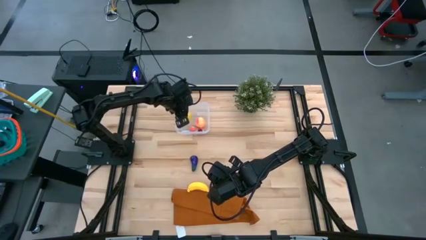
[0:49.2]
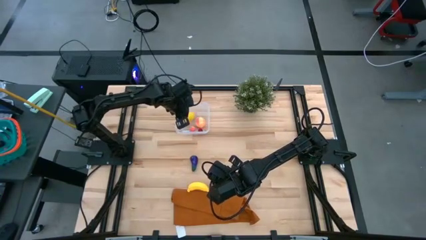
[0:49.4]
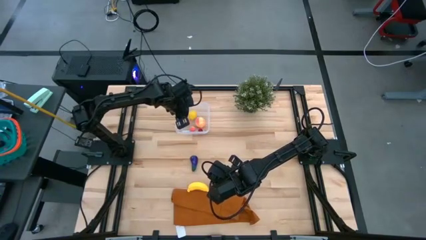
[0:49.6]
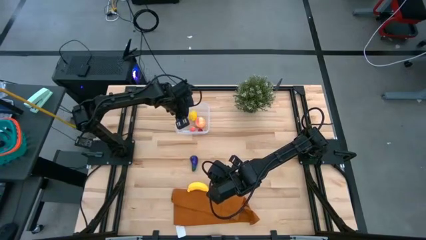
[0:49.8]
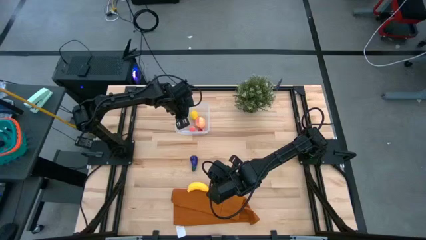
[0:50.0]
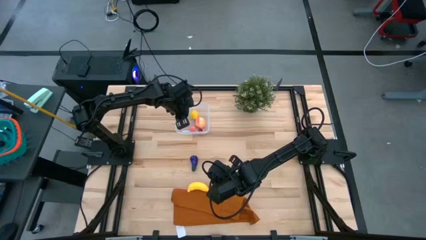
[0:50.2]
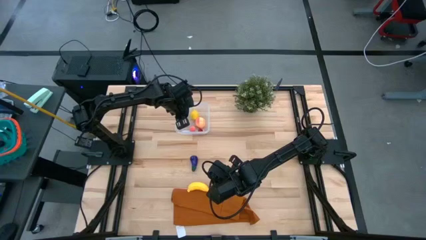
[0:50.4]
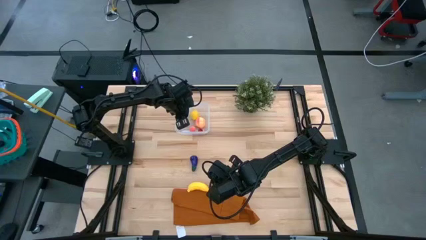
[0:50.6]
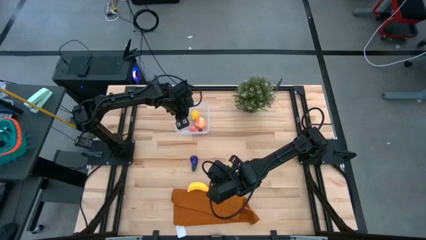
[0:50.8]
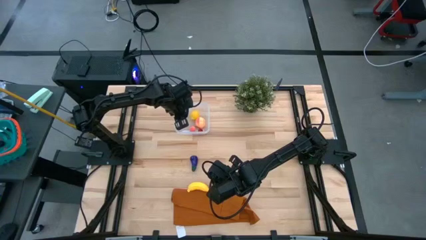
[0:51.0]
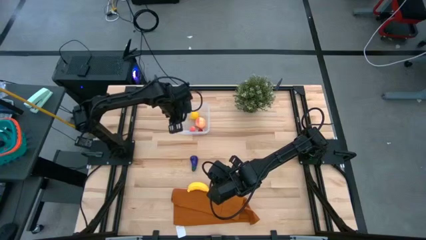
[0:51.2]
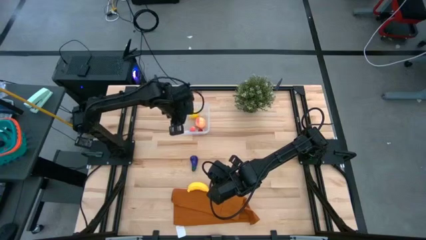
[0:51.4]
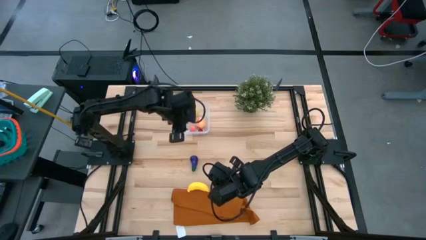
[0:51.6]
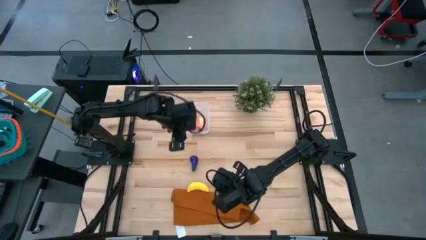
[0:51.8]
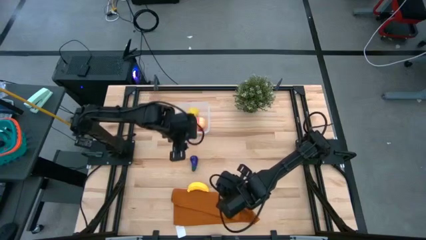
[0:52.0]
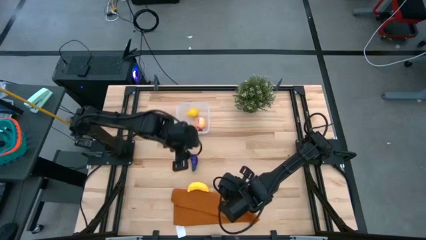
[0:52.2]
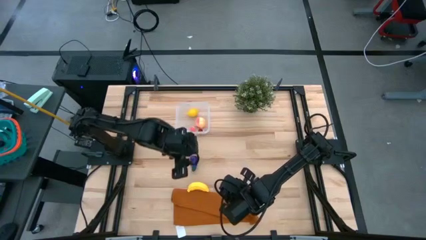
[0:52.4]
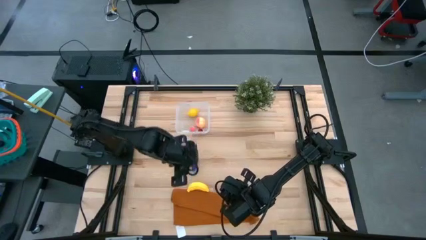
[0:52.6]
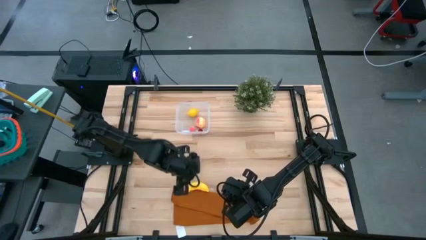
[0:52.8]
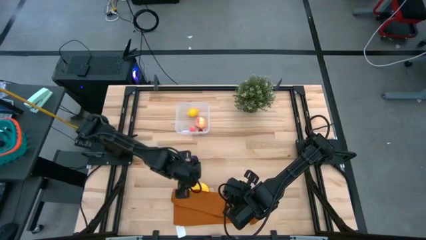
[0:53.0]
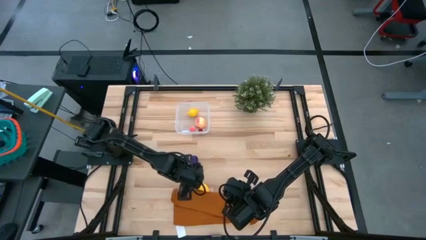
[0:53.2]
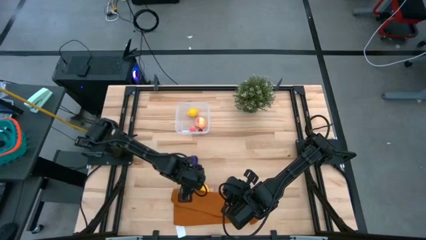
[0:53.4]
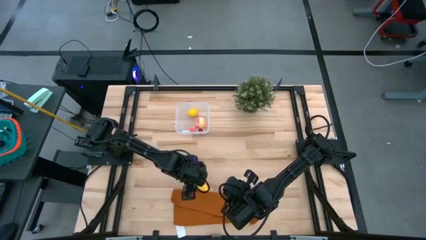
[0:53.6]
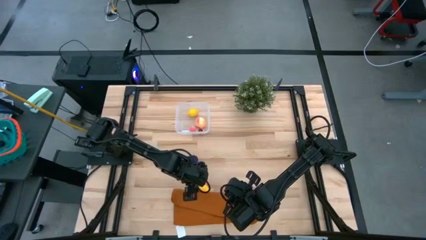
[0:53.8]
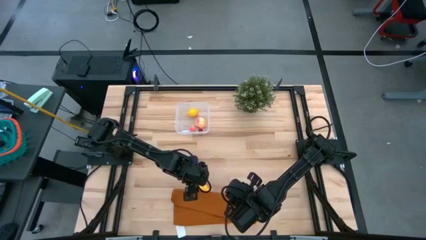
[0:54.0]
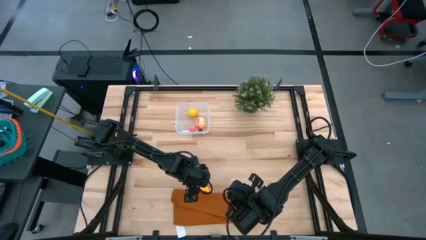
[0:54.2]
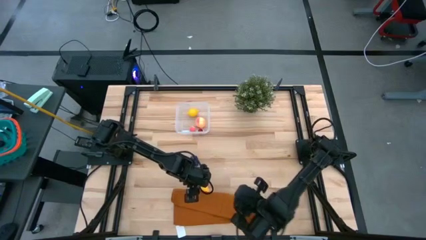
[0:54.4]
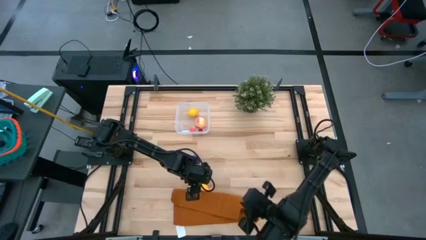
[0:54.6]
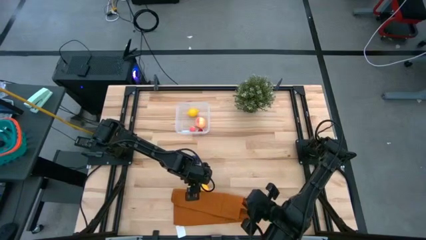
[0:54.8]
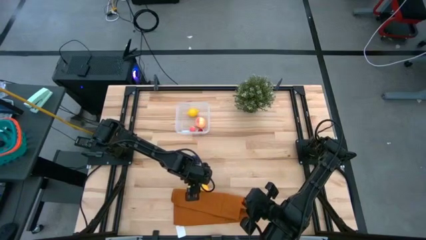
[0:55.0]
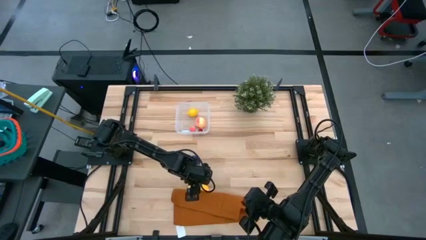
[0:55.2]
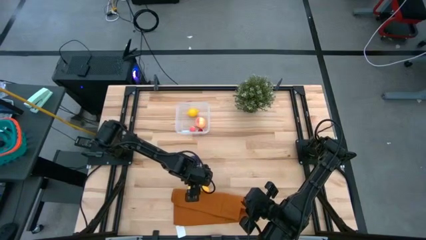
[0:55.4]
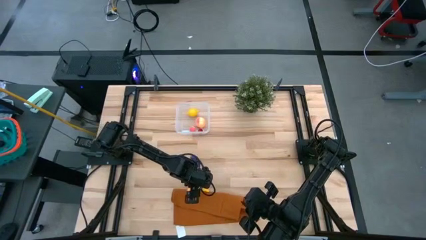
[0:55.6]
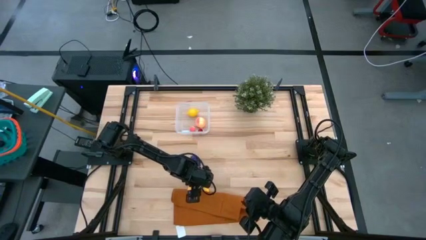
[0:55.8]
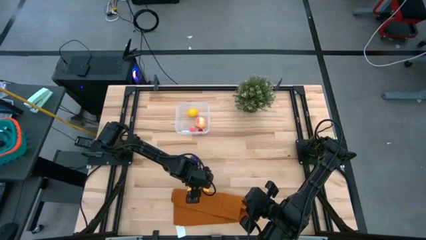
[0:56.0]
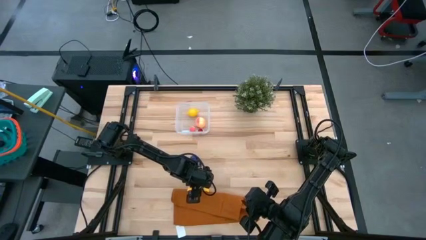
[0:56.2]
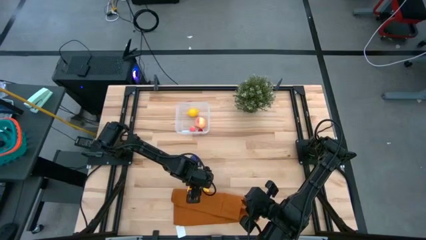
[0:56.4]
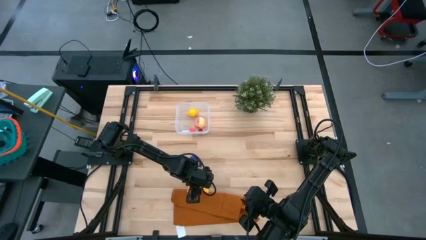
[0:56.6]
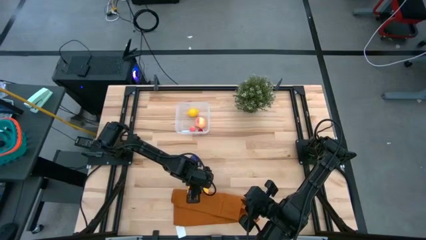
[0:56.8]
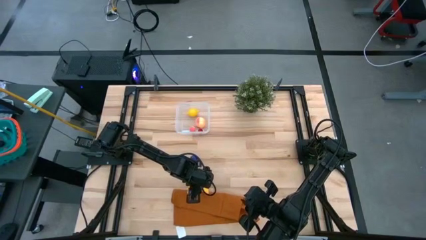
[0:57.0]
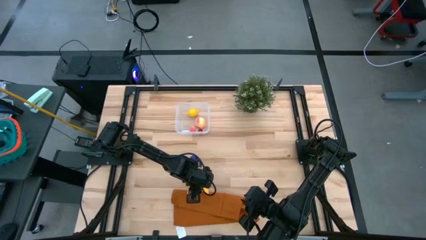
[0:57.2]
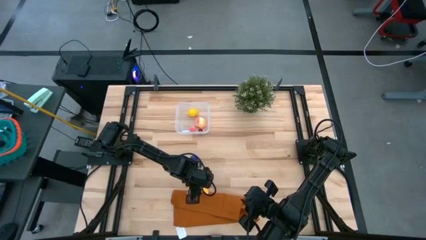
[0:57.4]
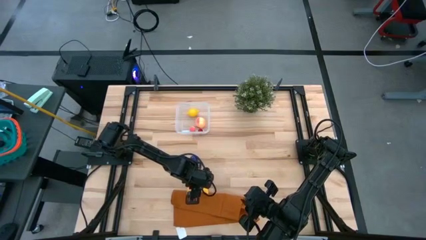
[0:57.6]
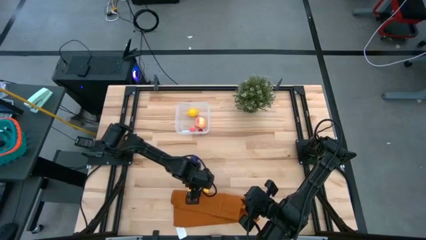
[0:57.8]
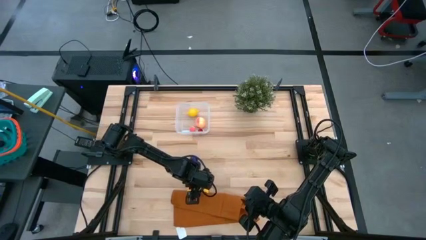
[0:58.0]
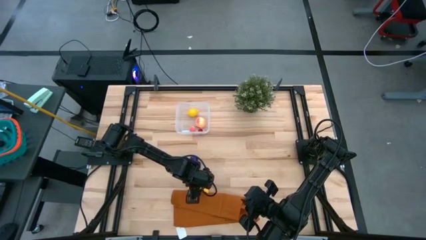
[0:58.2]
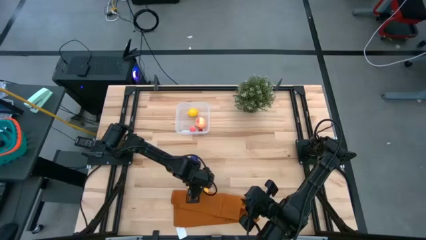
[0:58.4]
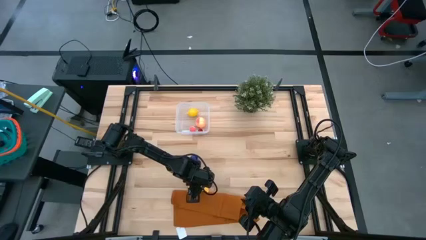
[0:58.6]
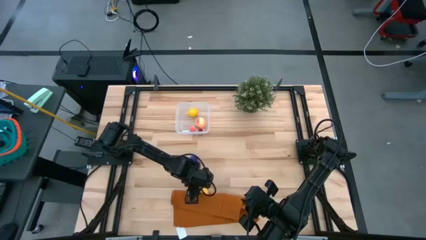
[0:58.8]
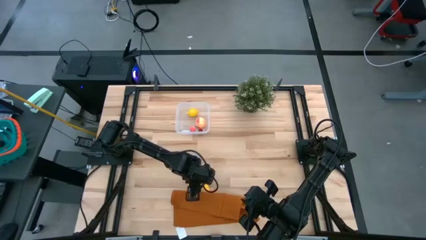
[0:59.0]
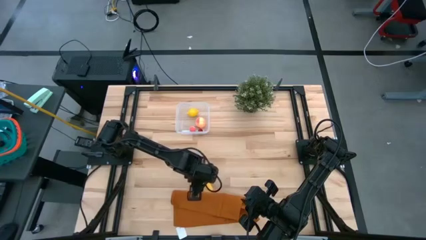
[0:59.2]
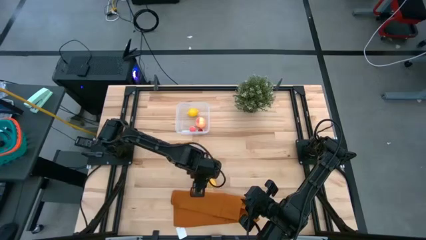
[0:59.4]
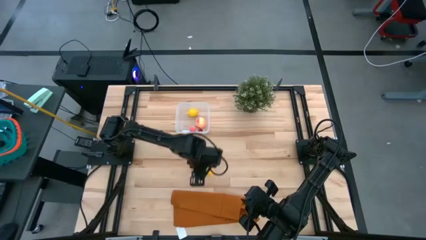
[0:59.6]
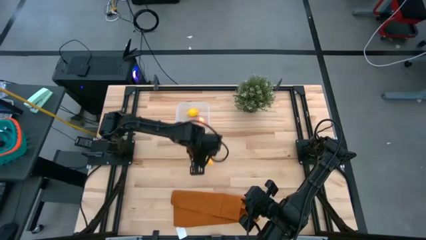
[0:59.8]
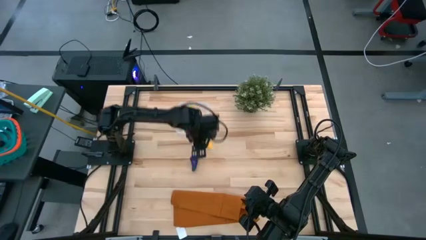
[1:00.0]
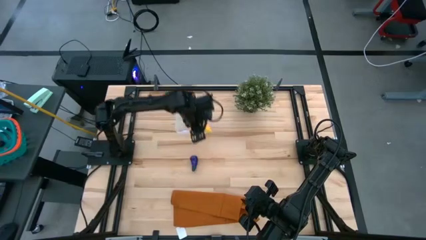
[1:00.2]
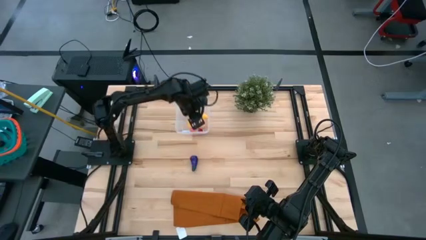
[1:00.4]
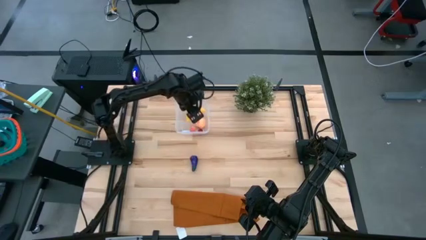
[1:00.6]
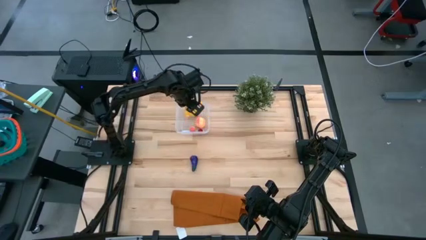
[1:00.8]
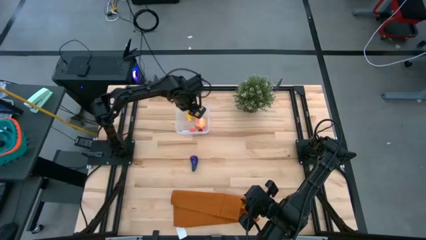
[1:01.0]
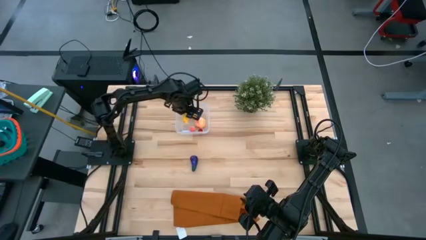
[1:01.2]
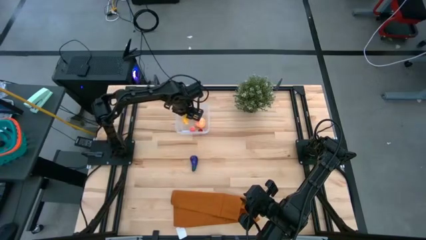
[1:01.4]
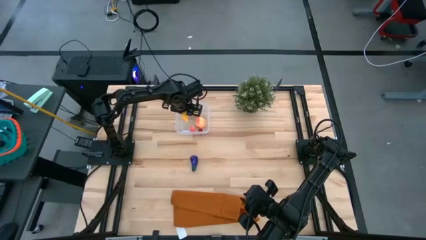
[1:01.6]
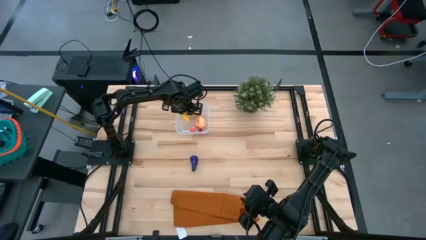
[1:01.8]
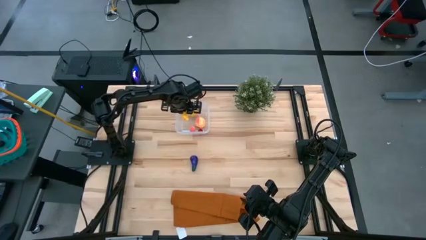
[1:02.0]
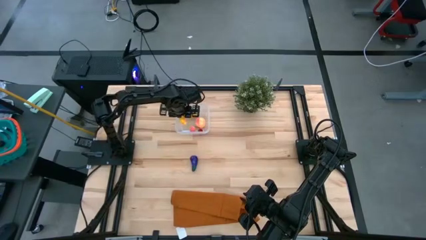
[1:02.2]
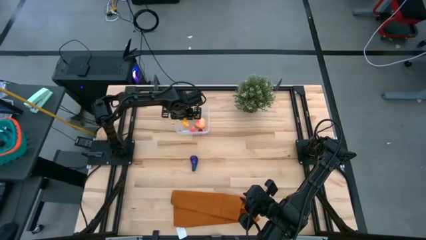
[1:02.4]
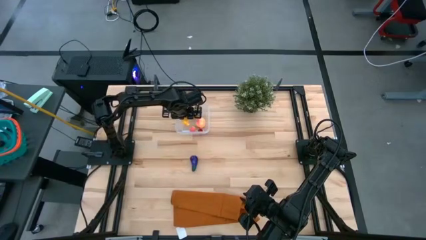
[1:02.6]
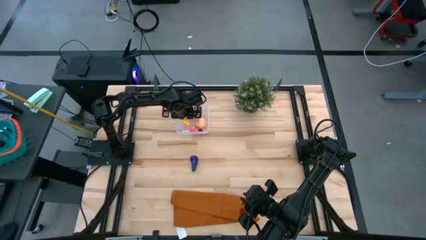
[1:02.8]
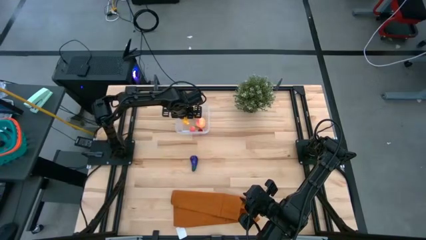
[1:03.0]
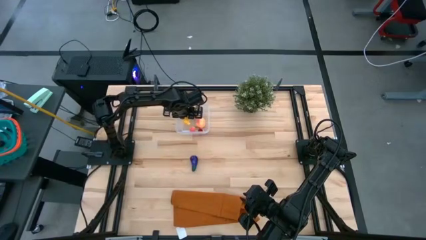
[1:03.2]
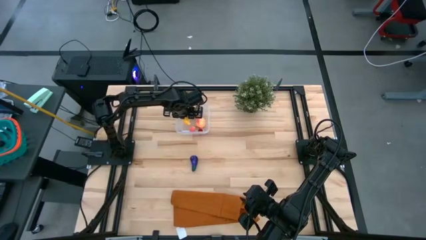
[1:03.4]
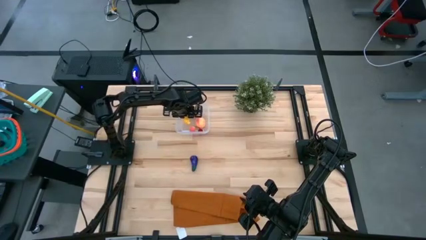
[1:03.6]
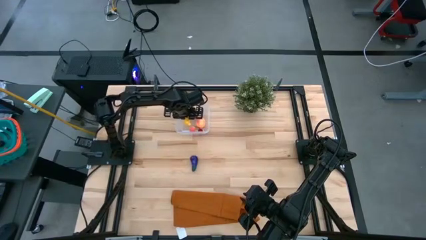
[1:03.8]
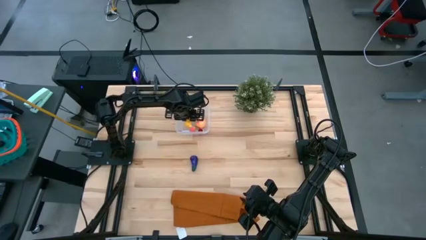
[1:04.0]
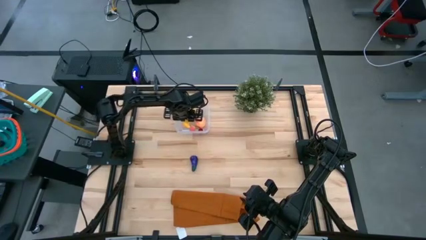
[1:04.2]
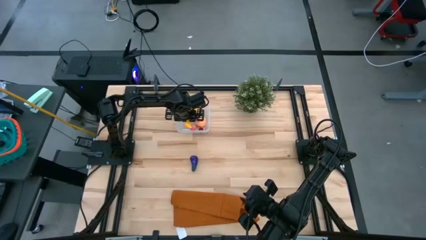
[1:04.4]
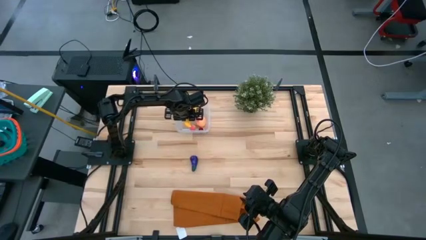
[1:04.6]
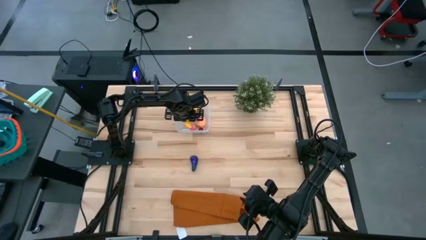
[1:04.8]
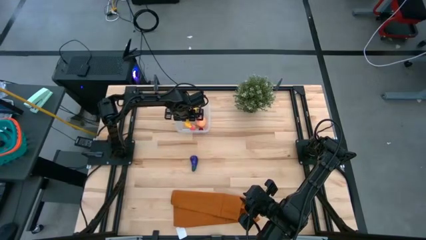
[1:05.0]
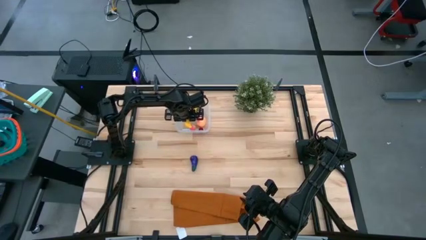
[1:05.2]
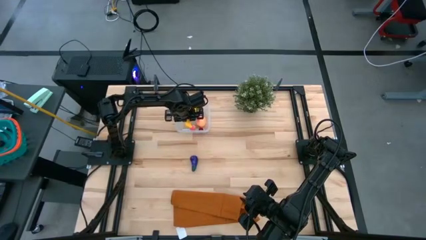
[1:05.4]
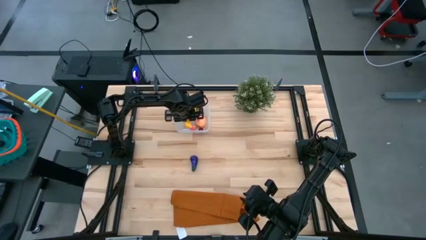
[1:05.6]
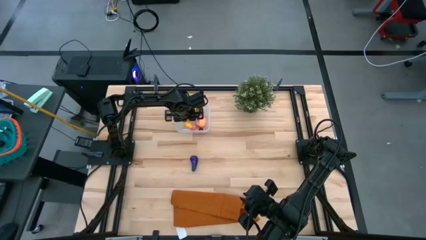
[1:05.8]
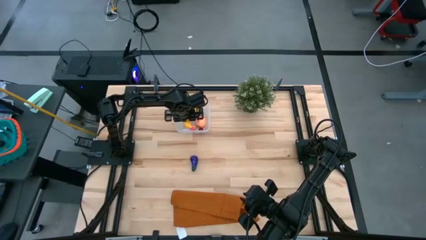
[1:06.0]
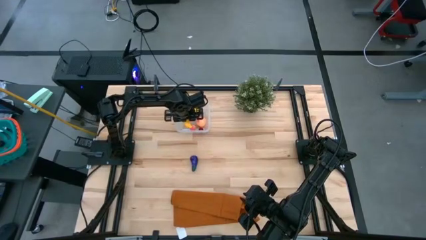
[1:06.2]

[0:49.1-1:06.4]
Task: Pick and placing Produce into tupperware
Put the banana into the container
